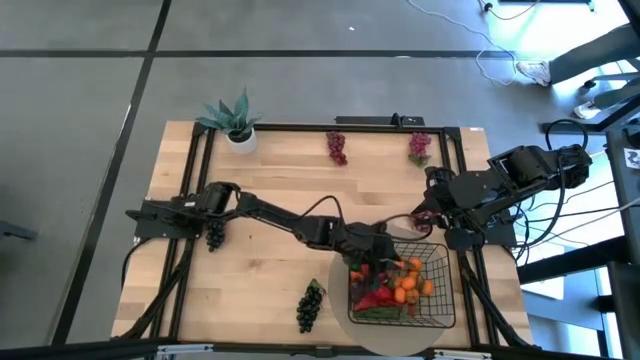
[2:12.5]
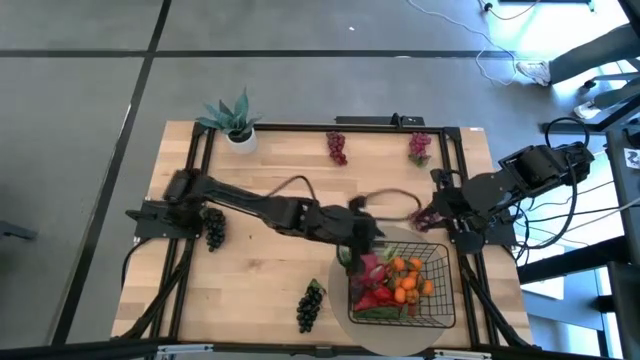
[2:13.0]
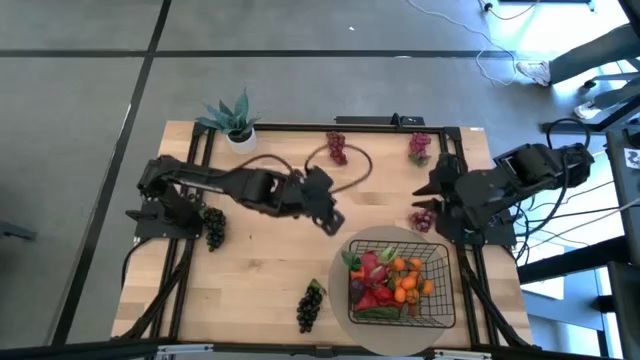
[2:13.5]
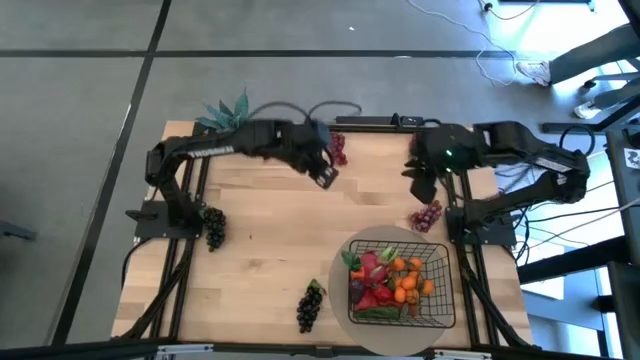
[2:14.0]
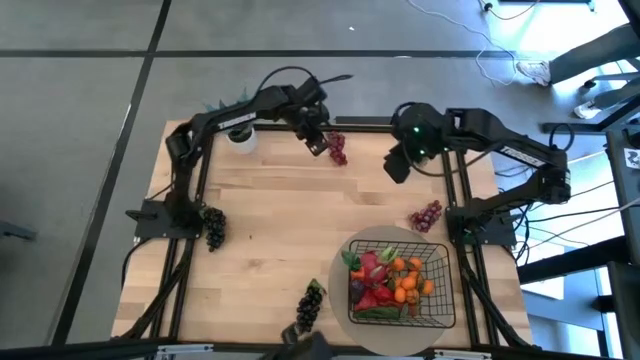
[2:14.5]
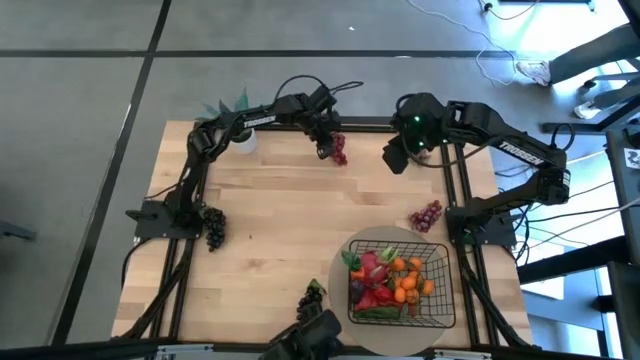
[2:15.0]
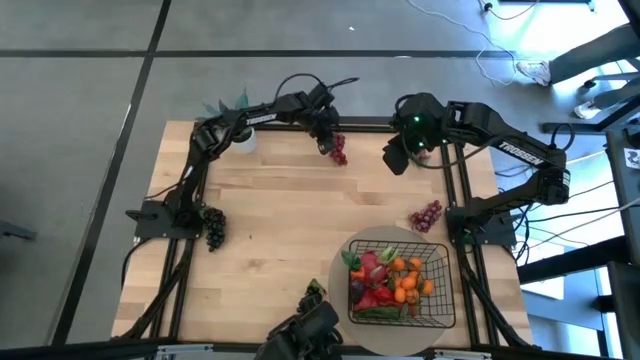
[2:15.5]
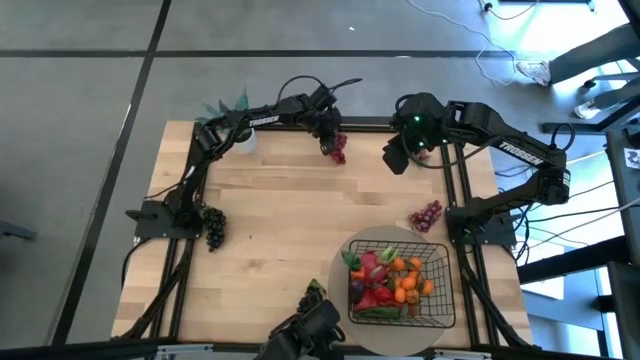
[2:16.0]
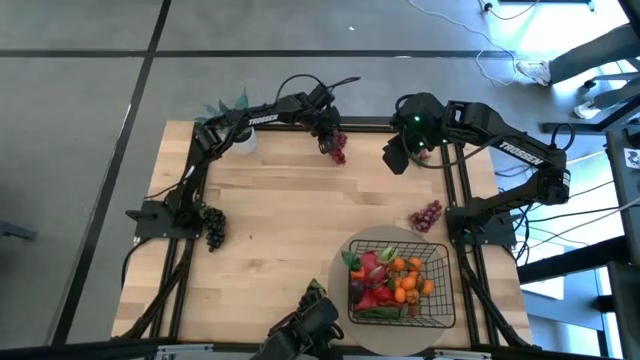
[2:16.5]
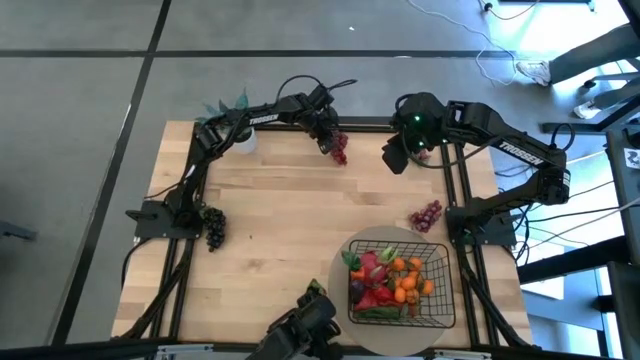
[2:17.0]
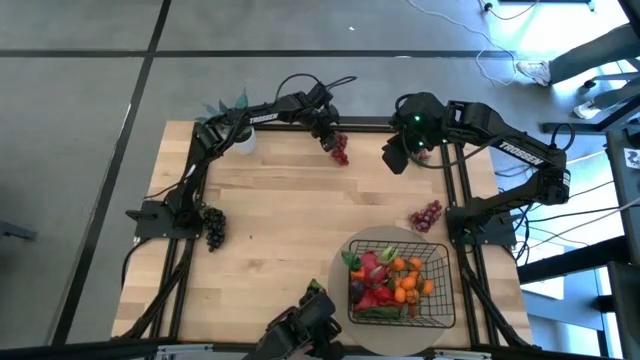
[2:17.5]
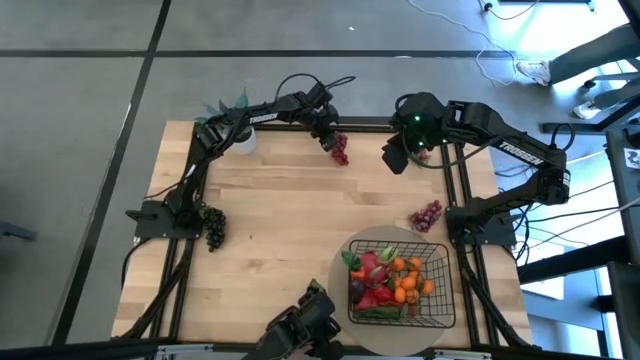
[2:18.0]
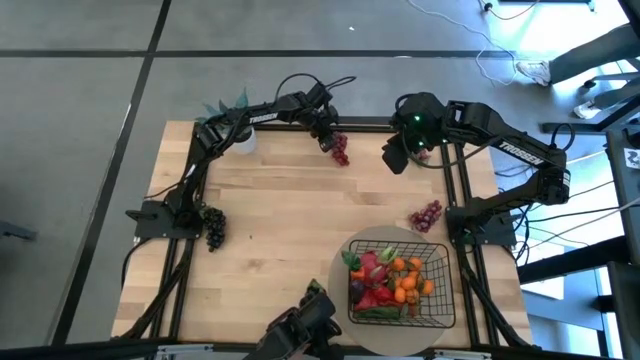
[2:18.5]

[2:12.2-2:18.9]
Task: Build produce basket
Put the top left red grapes into the black wire basket

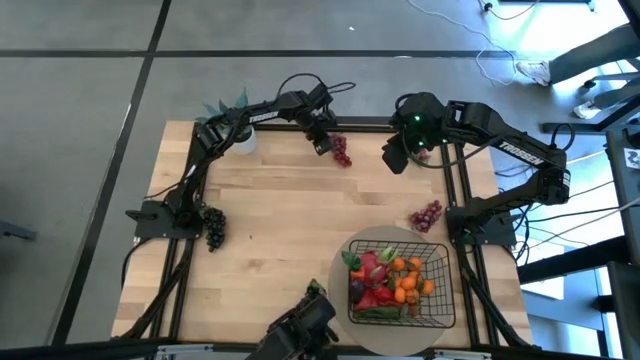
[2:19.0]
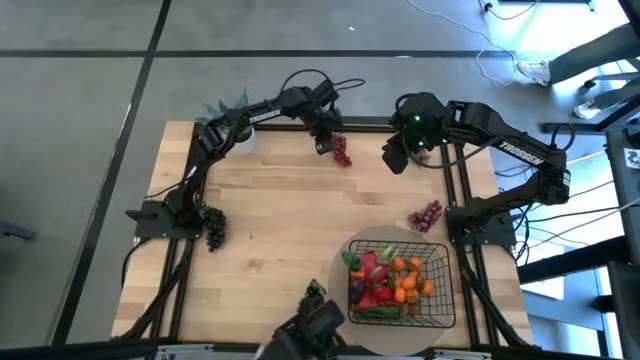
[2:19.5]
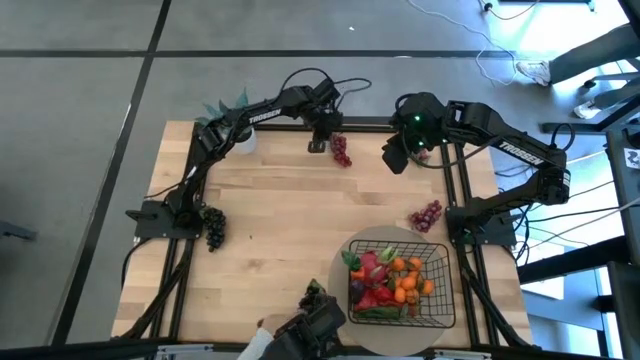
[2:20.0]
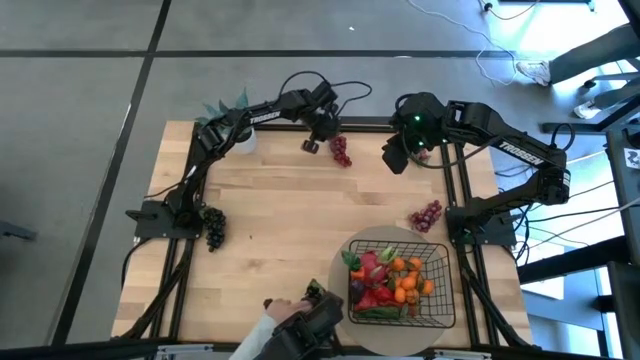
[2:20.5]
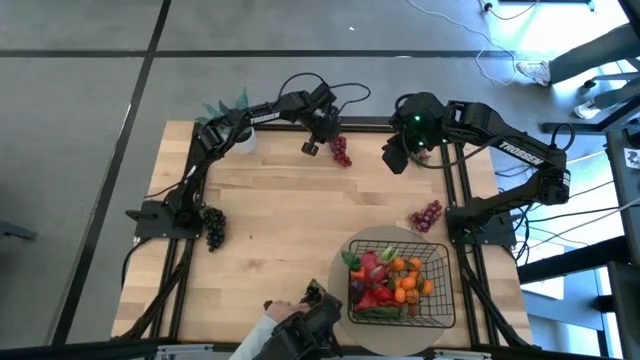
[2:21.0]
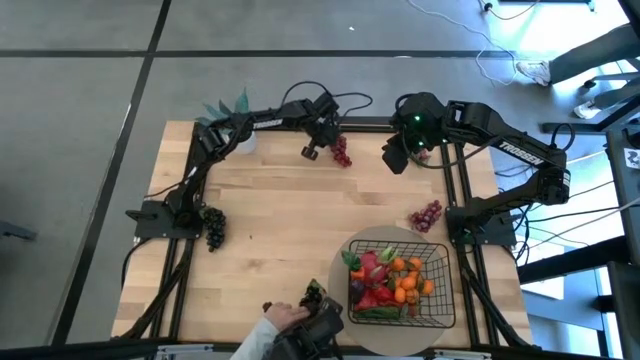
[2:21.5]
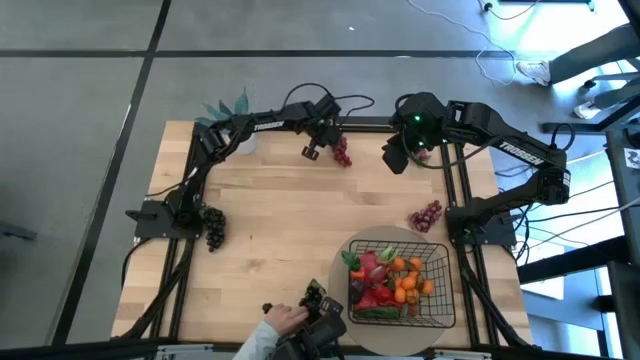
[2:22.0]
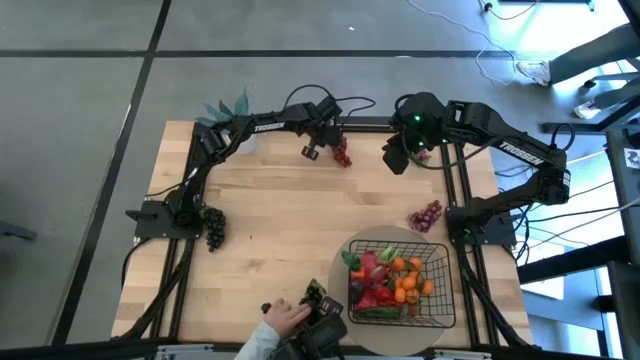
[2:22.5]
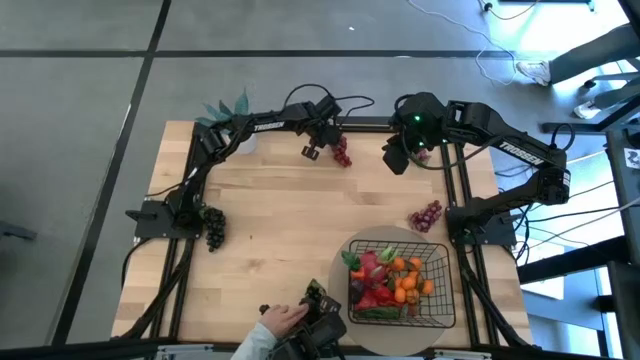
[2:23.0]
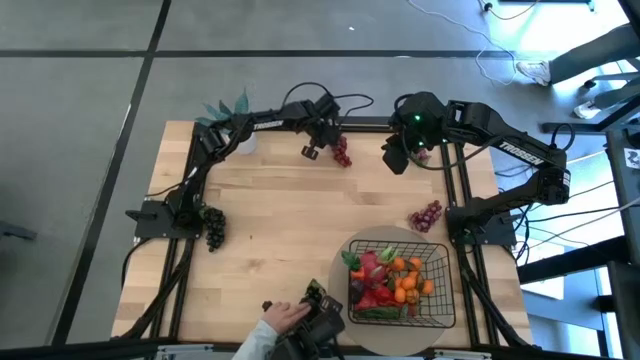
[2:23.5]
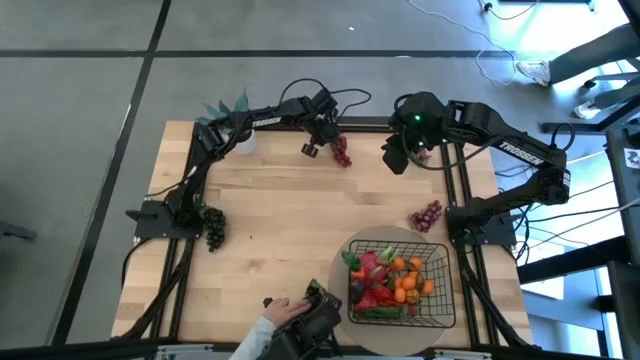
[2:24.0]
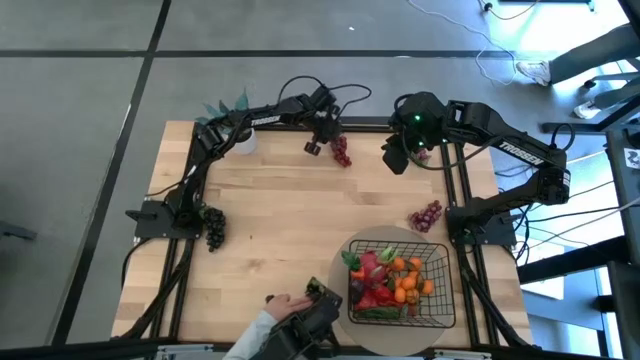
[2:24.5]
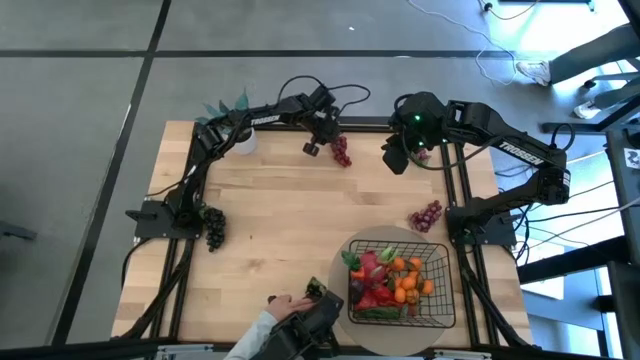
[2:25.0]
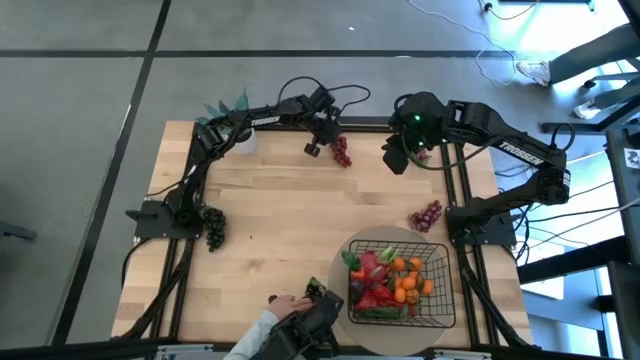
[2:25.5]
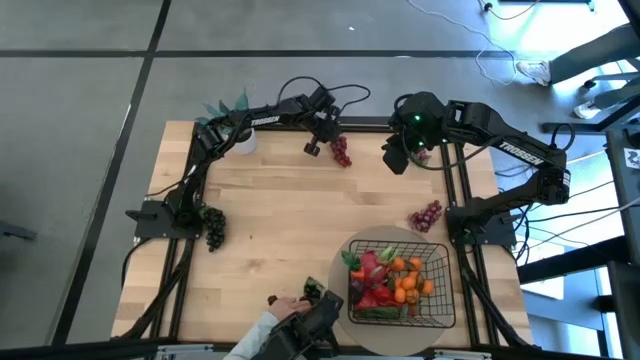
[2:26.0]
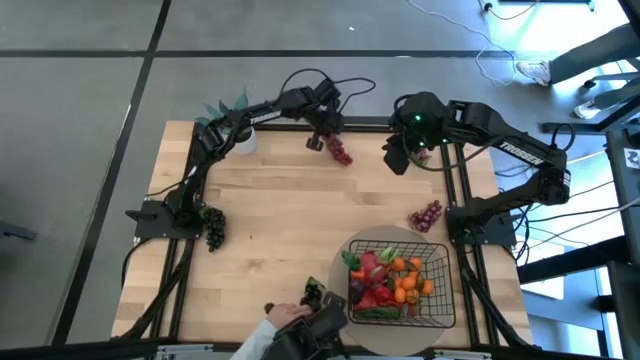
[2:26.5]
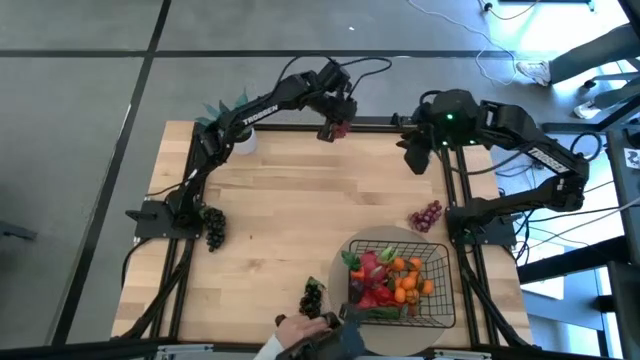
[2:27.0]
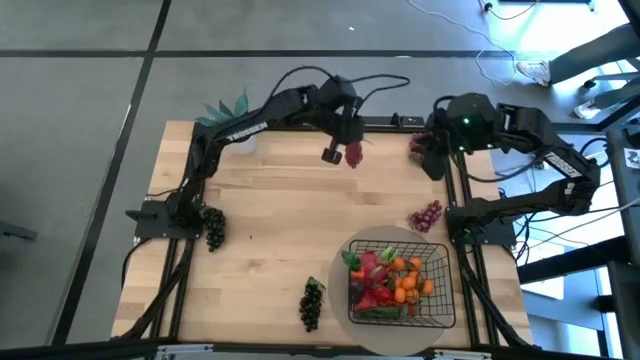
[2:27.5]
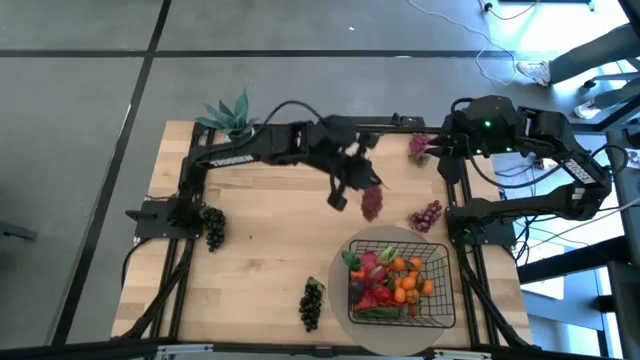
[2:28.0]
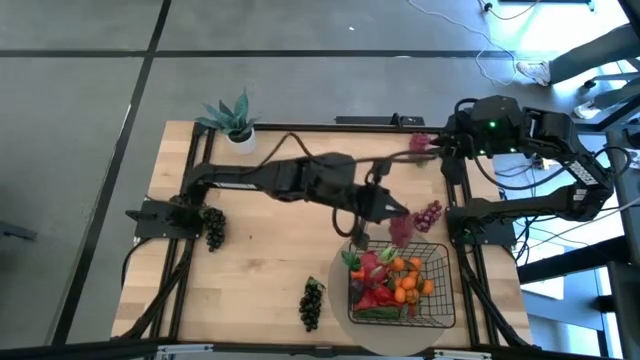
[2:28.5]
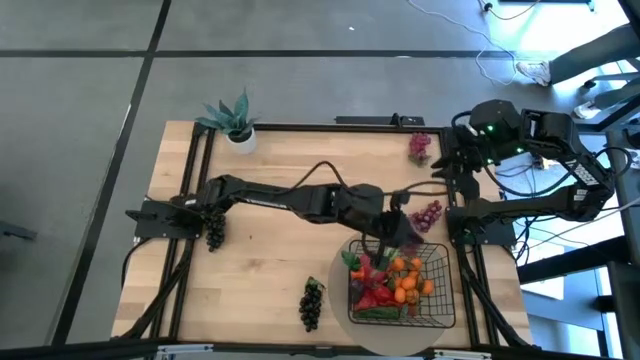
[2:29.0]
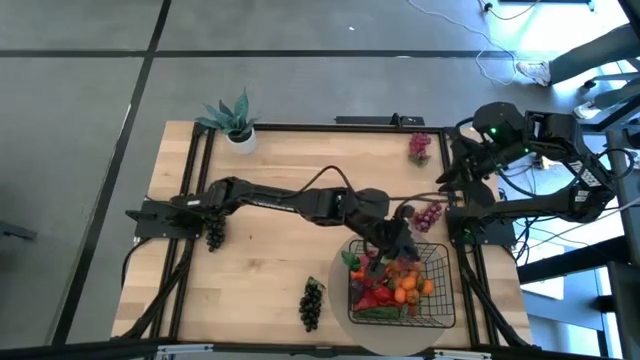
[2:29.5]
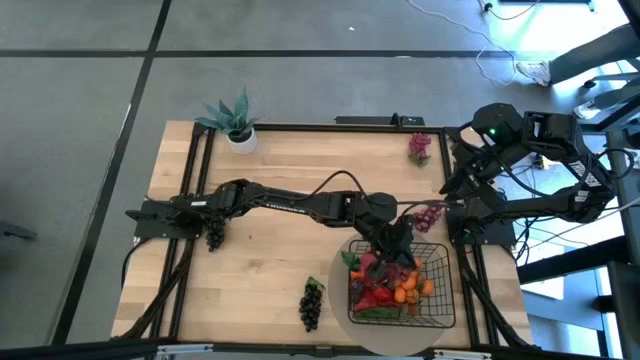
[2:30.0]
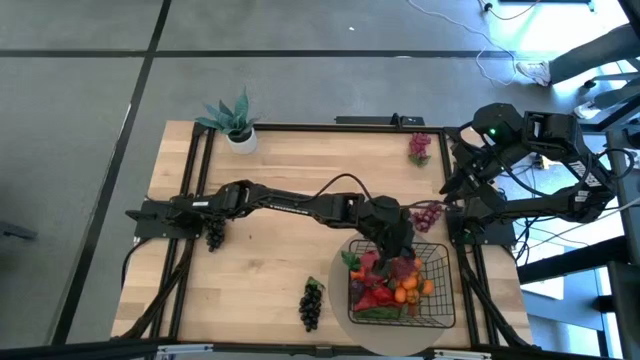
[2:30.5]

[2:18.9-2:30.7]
Put the top left red grapes into the black wire basket

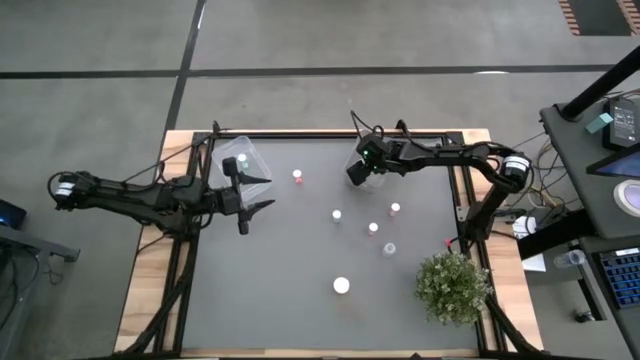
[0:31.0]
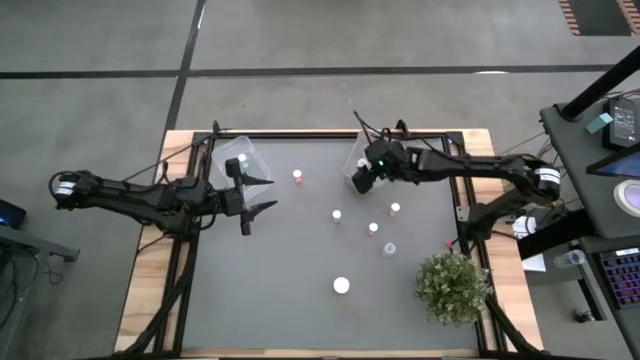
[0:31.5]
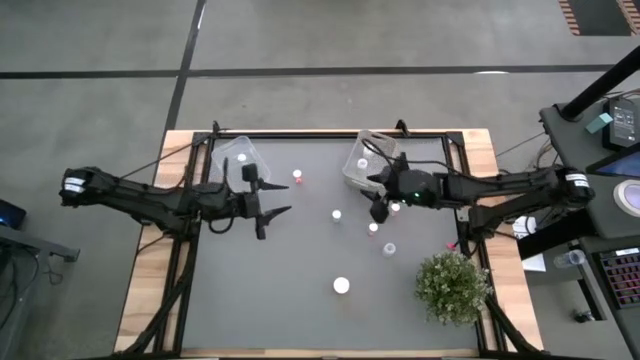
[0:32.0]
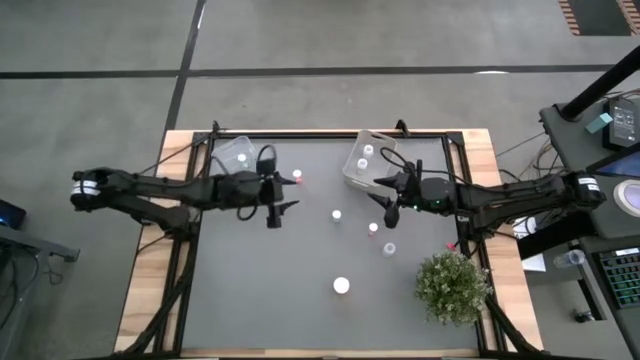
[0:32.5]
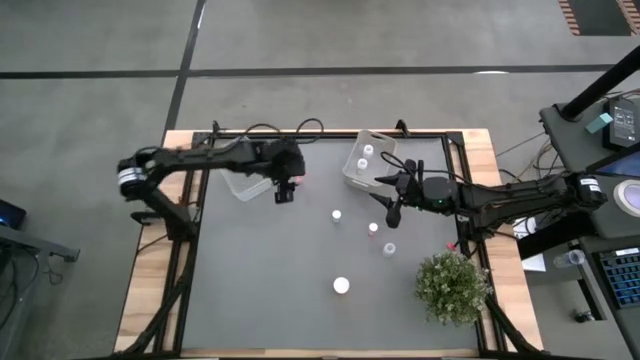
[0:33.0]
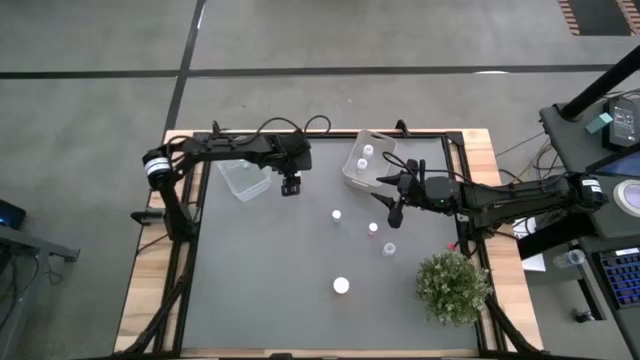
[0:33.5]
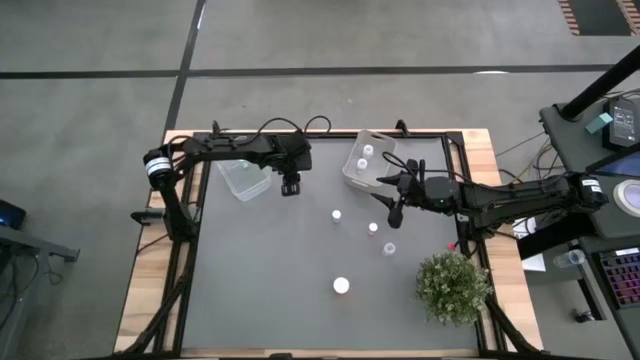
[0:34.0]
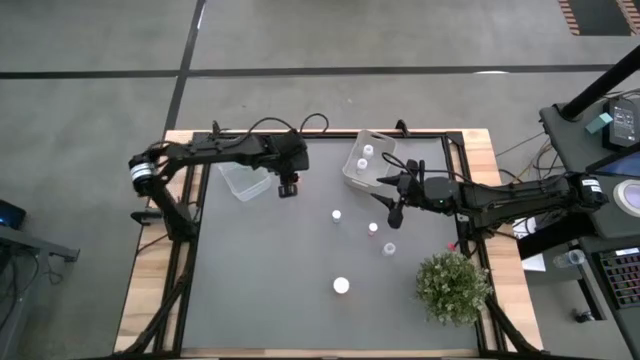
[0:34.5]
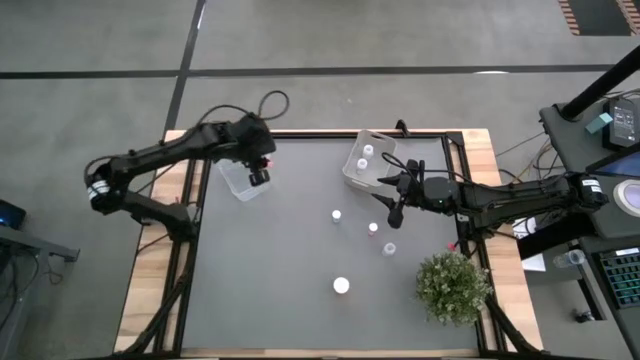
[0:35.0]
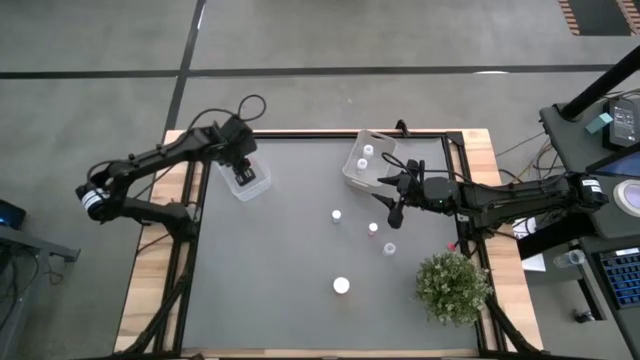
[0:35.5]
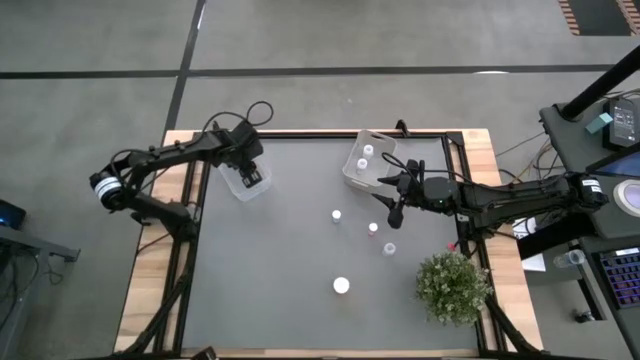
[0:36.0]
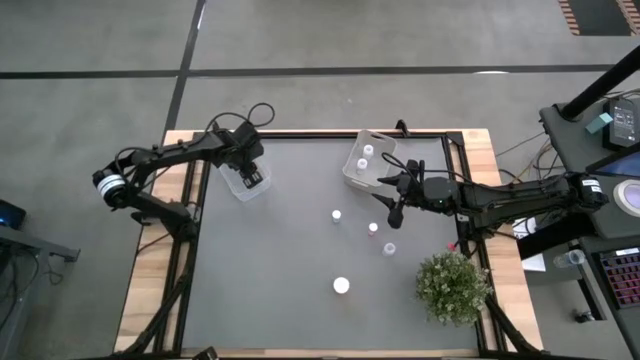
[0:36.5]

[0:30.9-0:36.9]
Task: Pick and place medicine bottles into bin by pill shape (circle, oval)
Put the red pill bottle into the transparent bin
